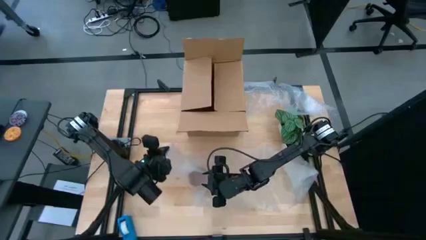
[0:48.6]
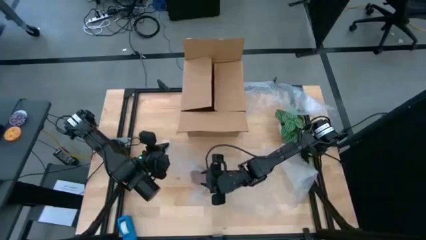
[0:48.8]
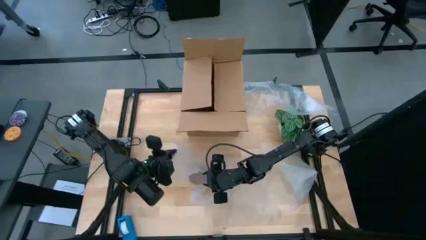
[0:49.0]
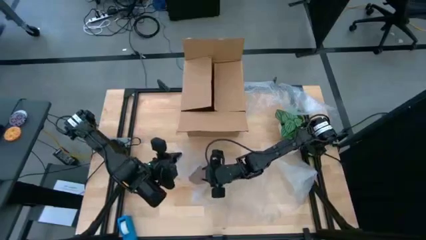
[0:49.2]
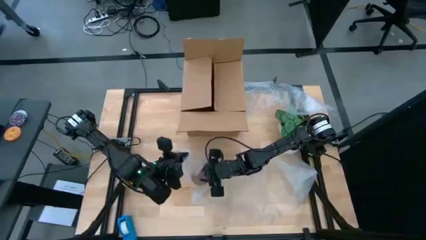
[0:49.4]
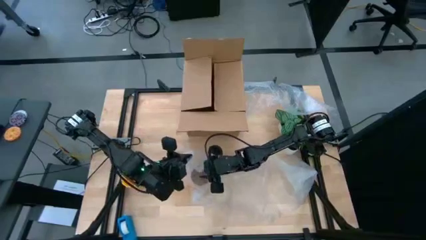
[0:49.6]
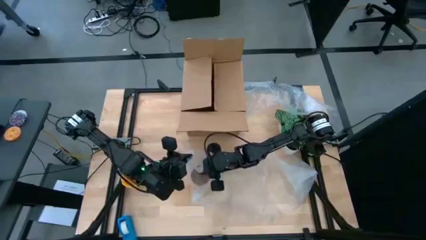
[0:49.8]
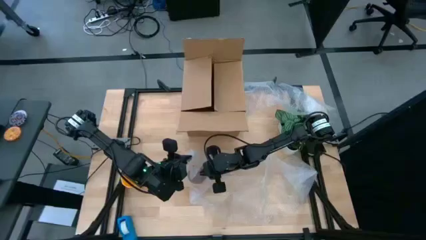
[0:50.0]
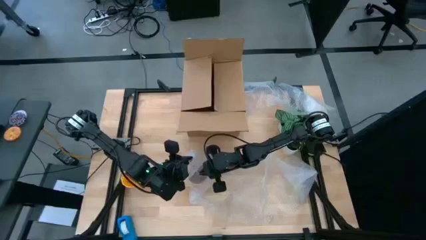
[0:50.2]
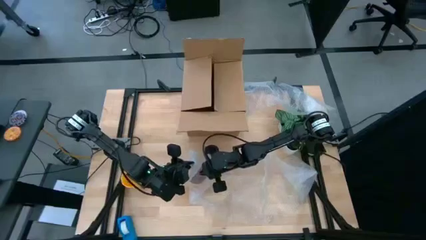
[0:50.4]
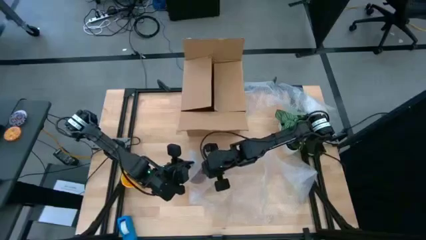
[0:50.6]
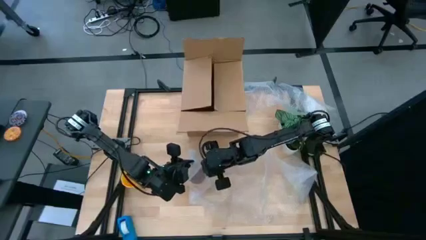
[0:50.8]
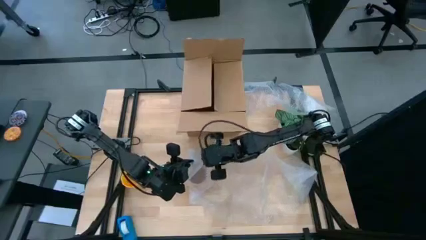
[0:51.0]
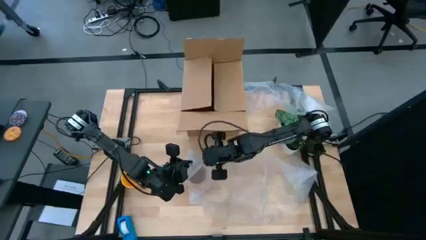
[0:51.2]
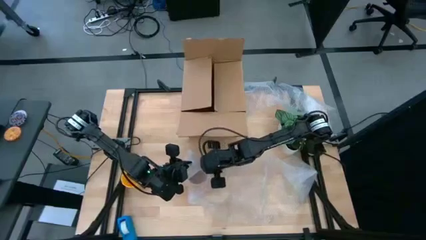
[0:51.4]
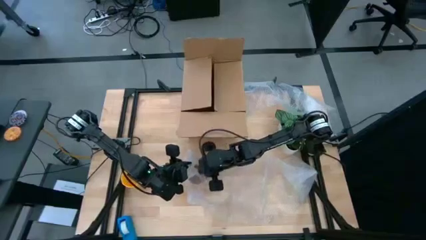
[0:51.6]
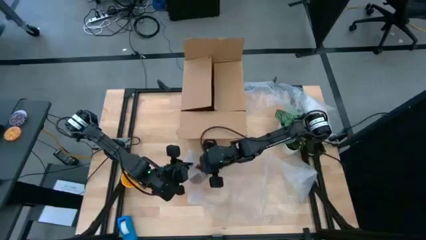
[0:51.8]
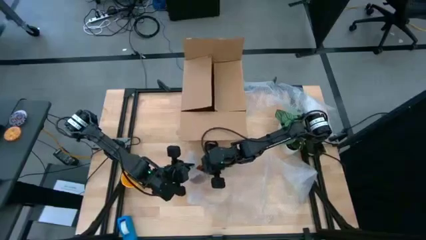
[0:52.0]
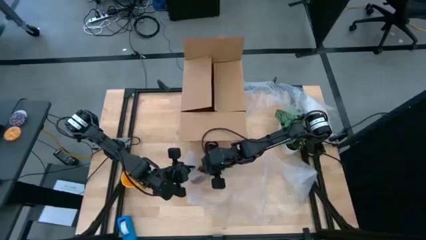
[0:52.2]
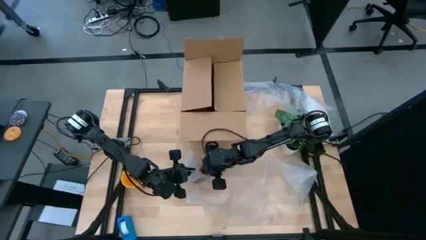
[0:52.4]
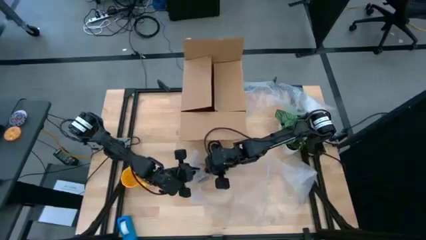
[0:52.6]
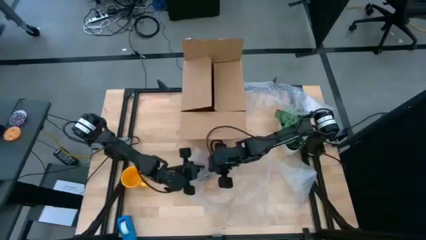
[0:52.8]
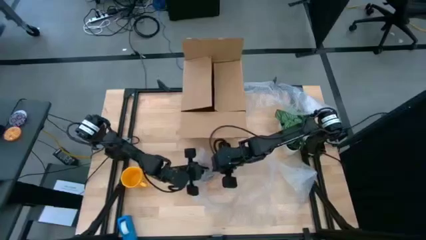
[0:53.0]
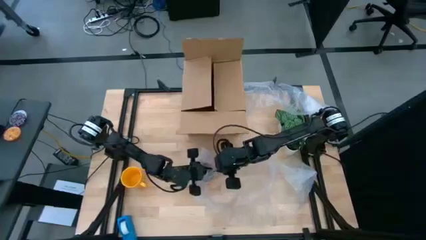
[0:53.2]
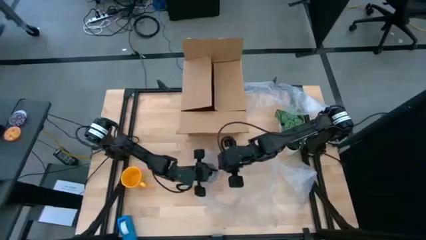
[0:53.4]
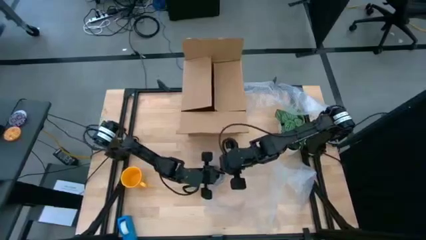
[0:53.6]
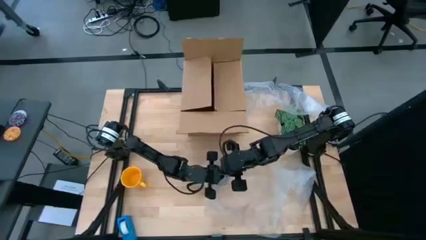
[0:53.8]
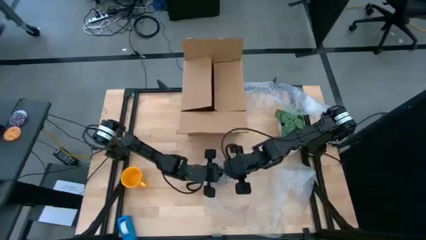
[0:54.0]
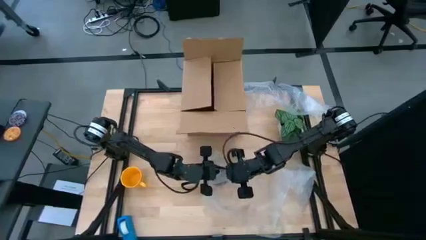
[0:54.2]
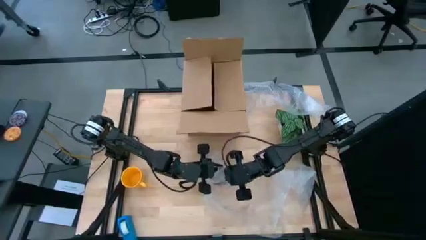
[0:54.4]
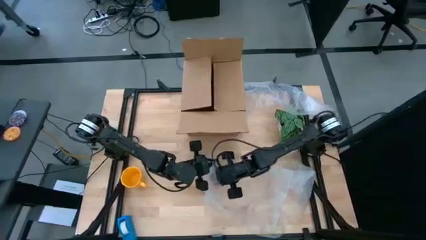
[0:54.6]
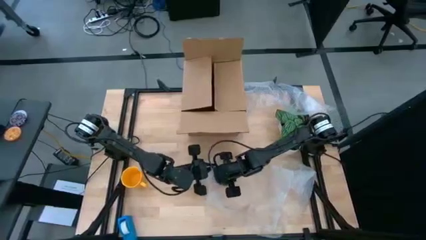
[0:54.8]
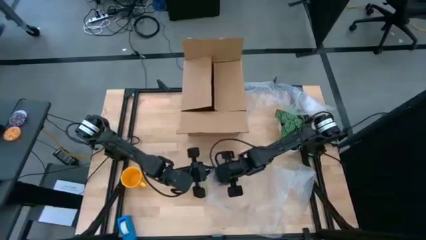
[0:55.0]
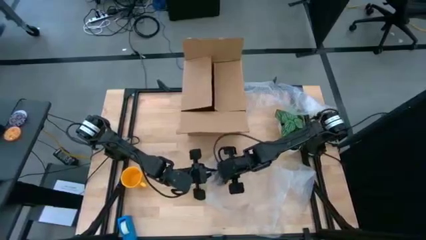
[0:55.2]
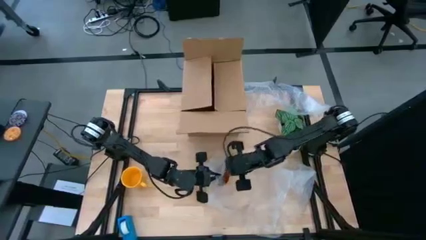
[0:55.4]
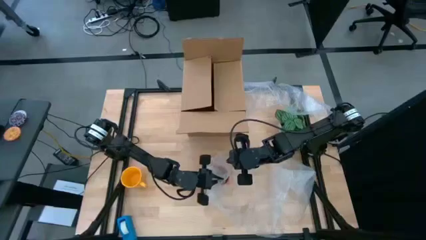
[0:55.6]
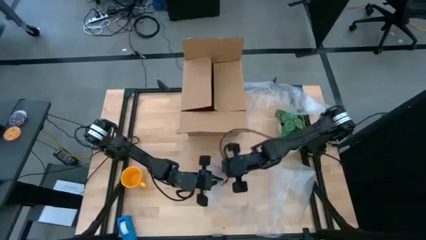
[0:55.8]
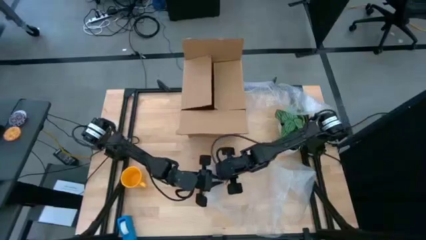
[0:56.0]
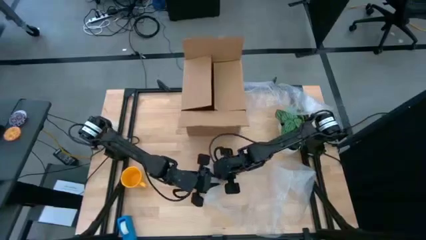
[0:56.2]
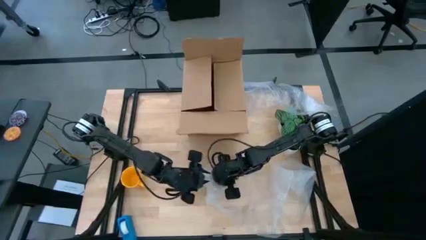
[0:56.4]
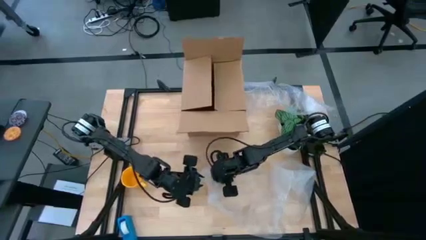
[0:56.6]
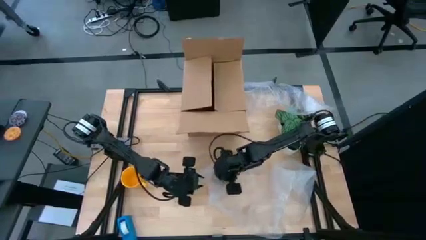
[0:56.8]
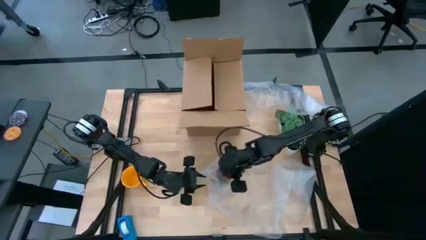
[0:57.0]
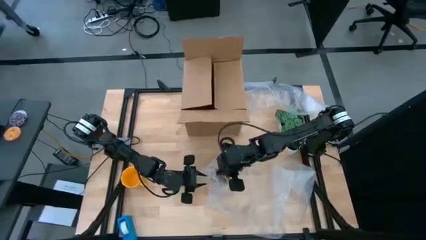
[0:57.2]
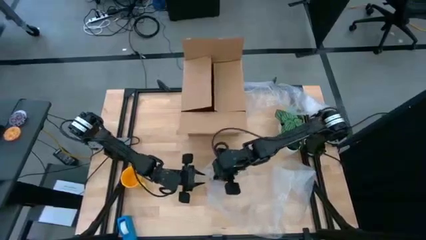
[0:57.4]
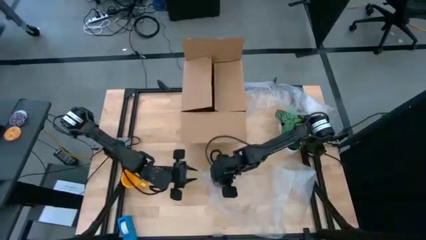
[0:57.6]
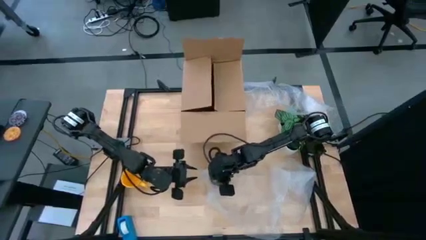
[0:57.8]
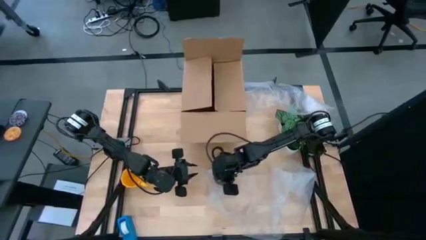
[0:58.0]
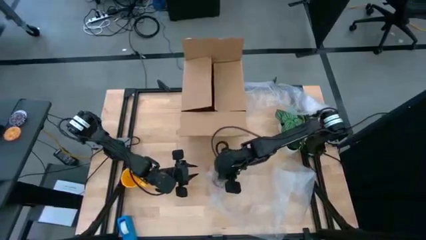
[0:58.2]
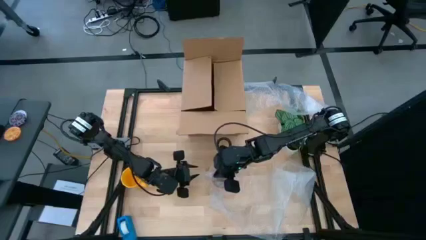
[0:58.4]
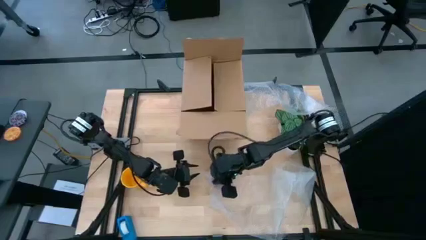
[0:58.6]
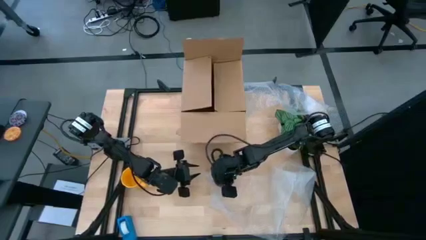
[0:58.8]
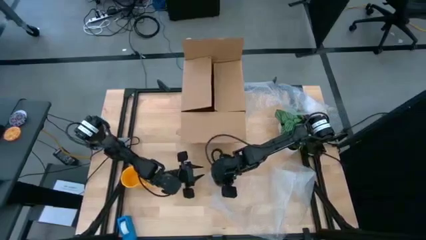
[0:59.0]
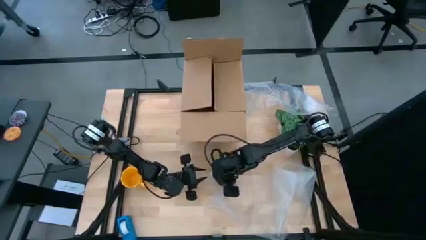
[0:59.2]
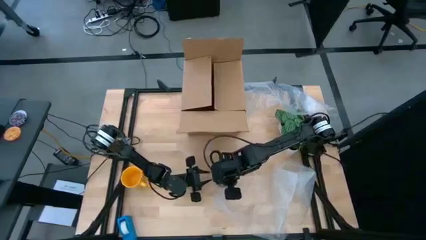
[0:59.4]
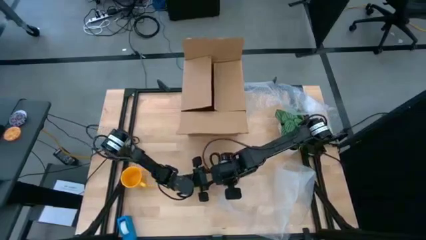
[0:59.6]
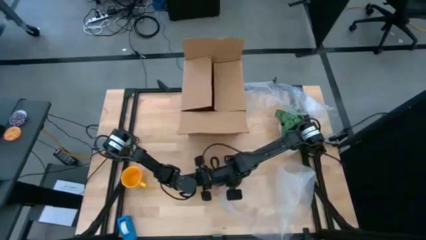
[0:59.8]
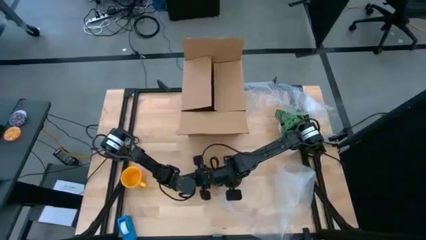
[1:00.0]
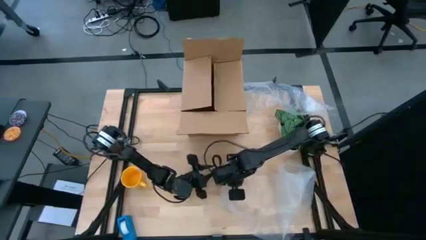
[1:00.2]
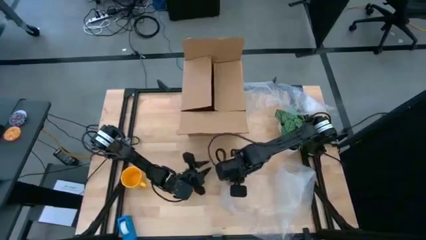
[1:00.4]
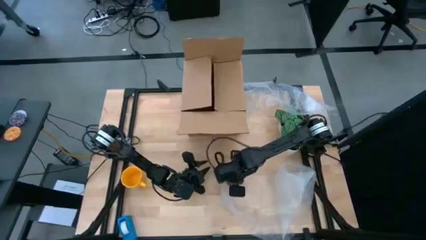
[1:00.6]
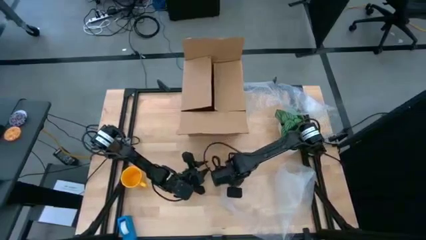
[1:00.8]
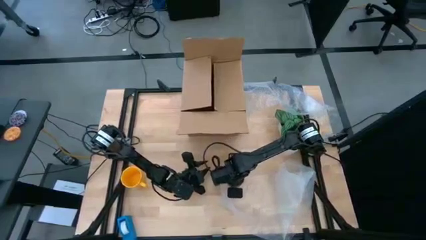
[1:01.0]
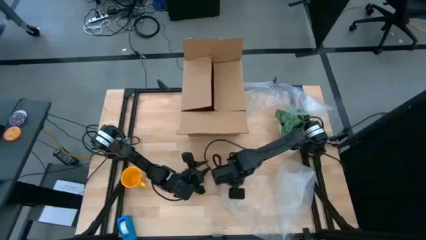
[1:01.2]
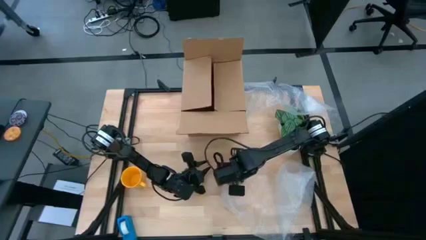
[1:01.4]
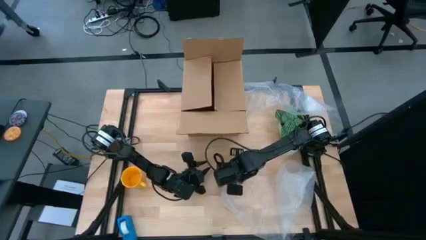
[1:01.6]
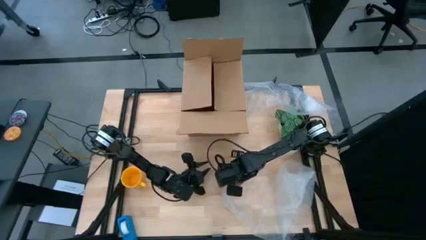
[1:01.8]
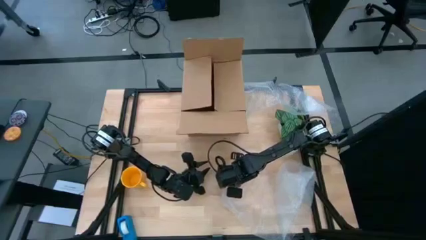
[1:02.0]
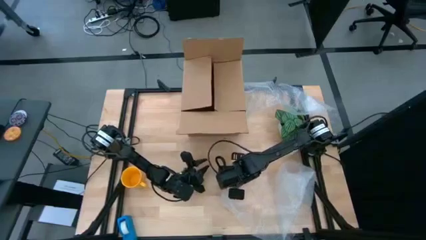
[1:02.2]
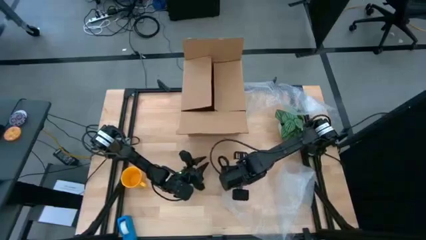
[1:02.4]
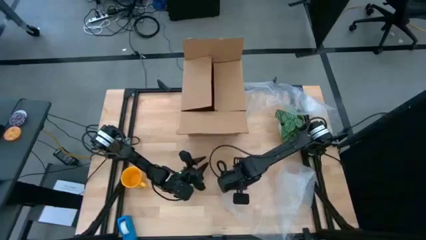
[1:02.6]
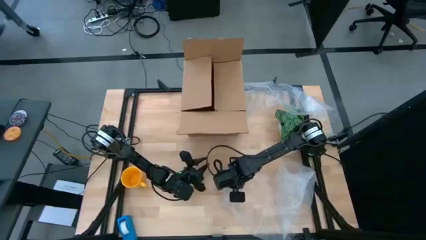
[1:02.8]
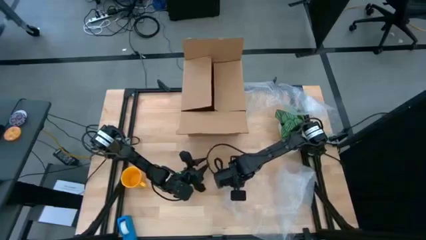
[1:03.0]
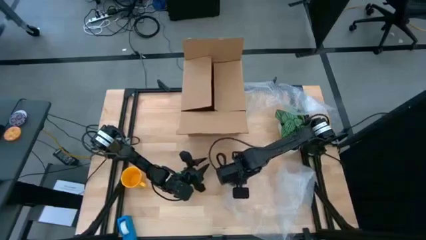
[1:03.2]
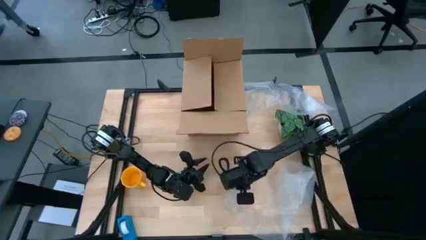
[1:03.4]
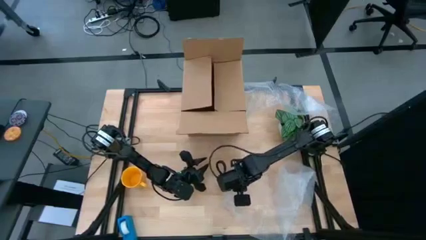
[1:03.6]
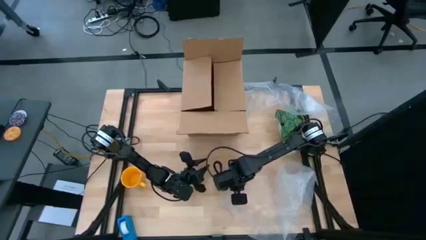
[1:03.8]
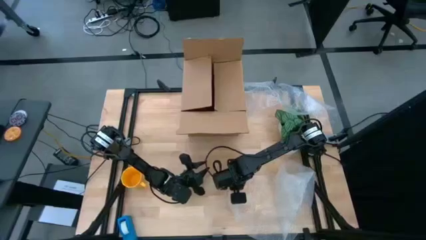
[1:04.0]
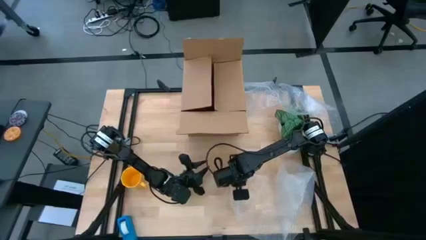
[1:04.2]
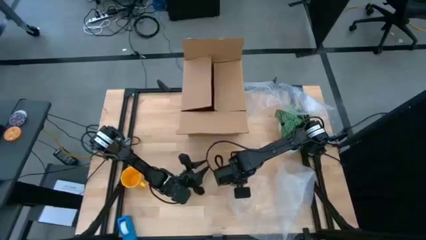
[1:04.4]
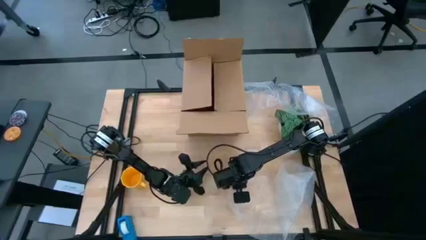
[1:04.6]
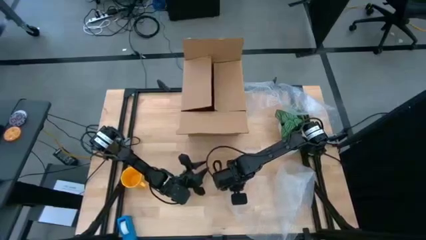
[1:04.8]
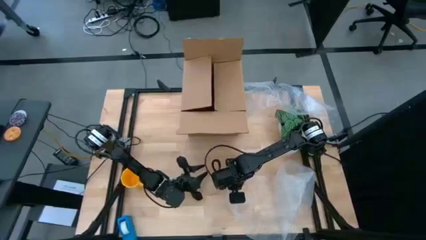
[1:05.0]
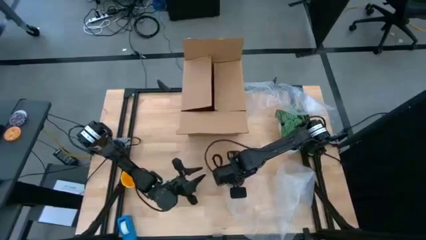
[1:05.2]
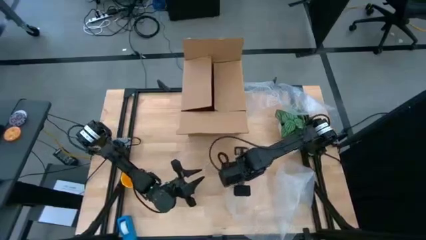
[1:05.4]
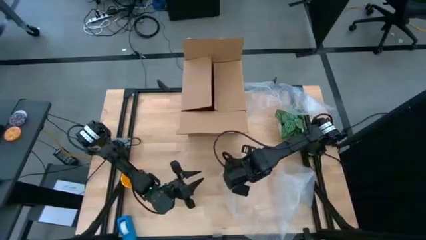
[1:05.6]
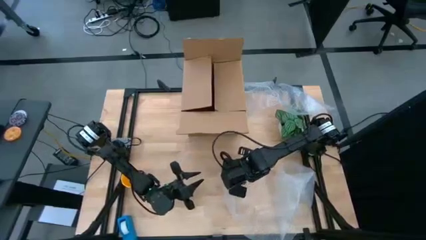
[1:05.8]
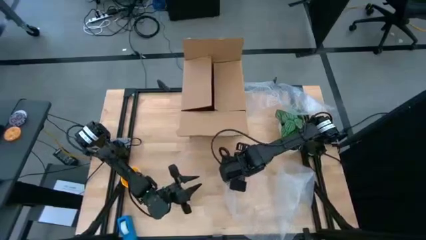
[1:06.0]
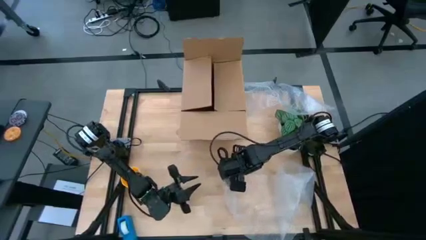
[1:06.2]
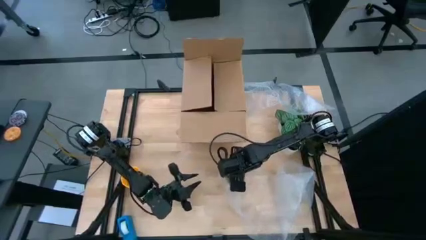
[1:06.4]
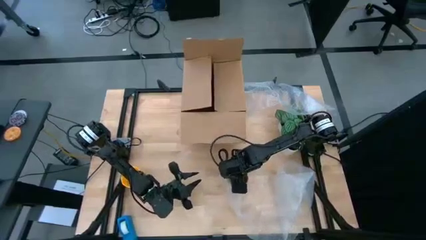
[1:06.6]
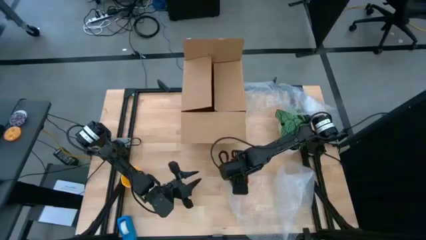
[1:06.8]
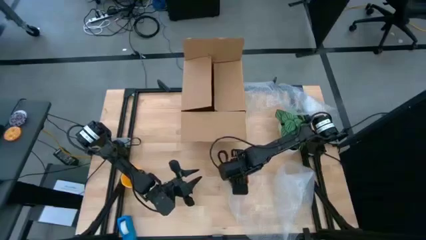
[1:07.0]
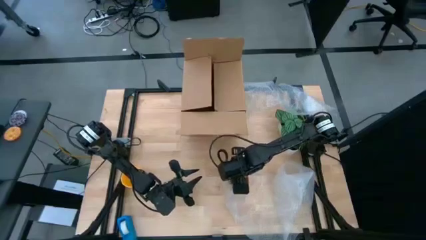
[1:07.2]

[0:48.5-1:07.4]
Task: wrap mug
Wrap the orange cup with the bubble wrap
